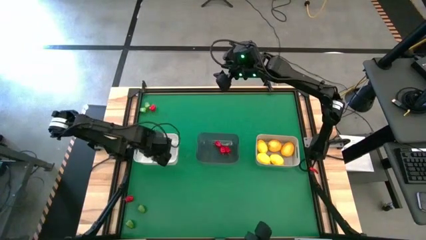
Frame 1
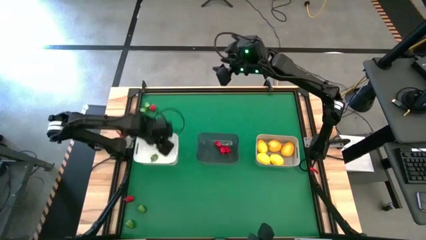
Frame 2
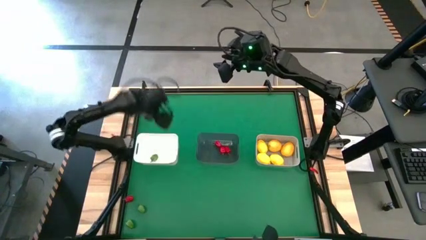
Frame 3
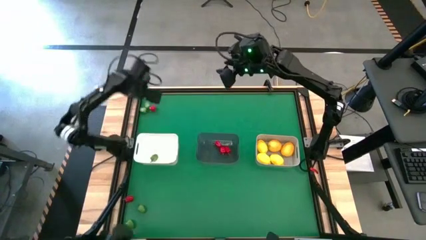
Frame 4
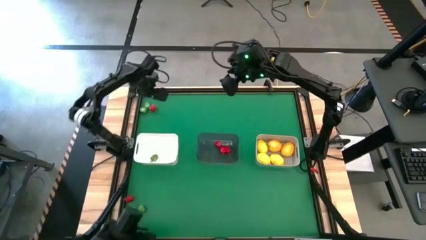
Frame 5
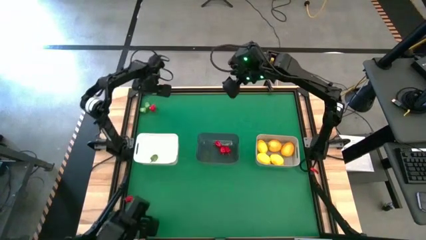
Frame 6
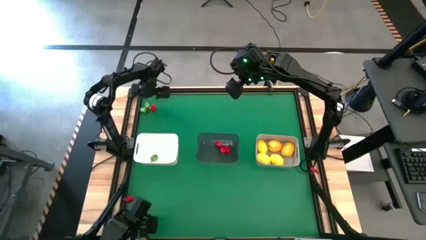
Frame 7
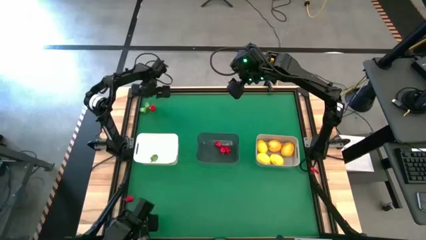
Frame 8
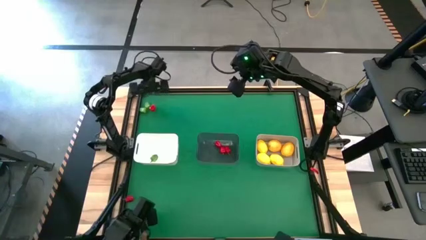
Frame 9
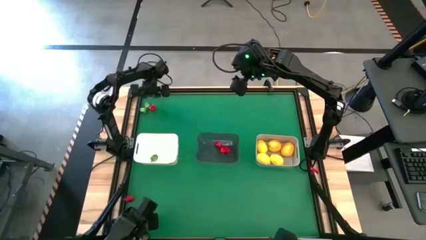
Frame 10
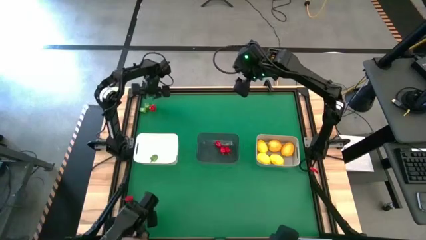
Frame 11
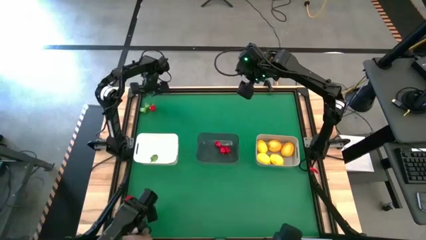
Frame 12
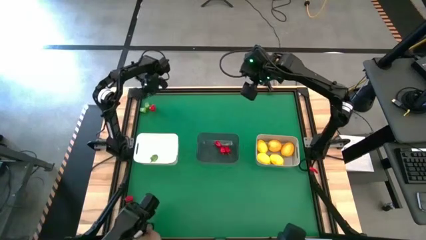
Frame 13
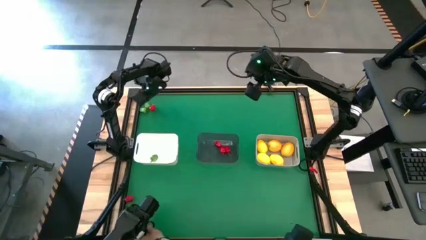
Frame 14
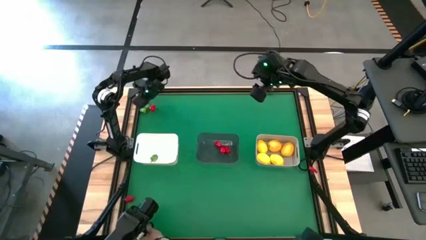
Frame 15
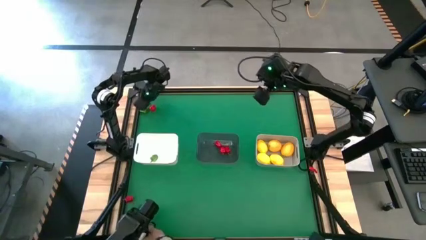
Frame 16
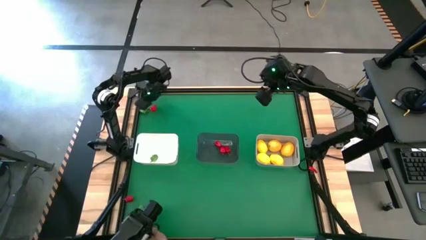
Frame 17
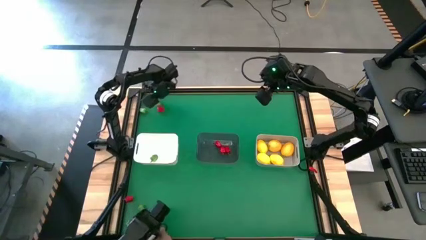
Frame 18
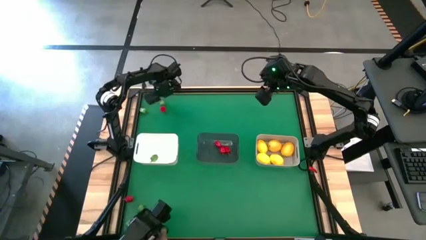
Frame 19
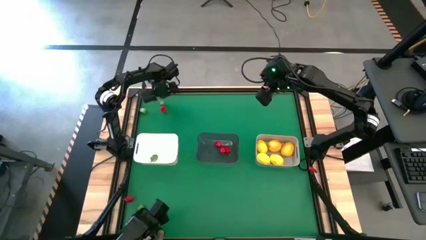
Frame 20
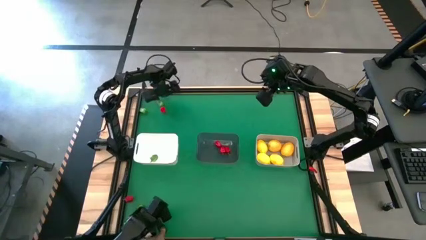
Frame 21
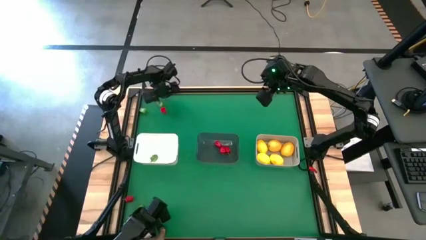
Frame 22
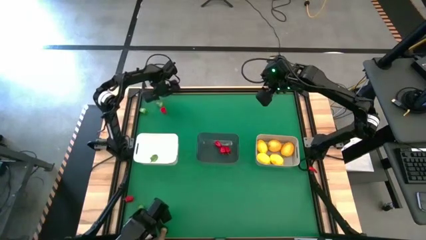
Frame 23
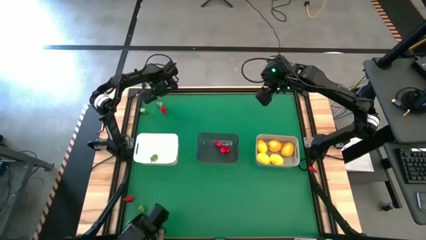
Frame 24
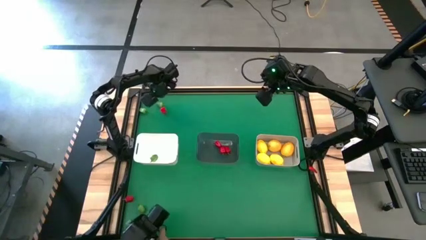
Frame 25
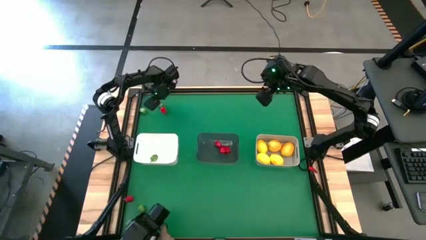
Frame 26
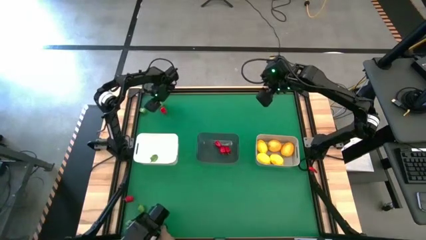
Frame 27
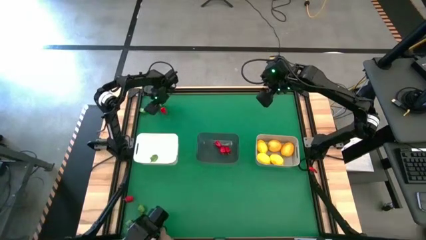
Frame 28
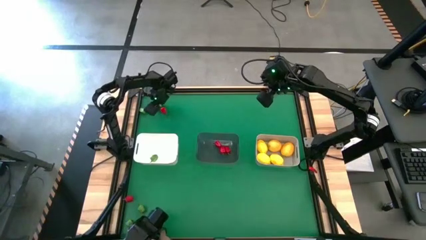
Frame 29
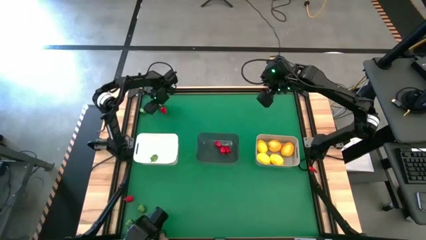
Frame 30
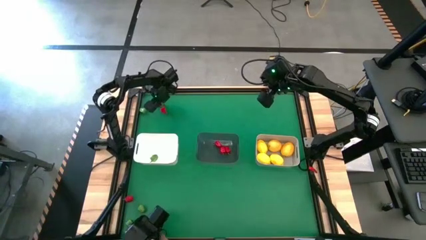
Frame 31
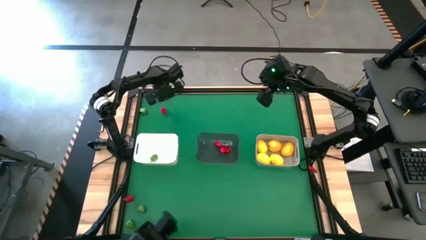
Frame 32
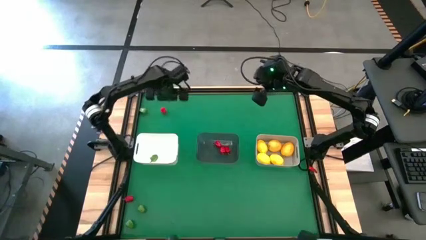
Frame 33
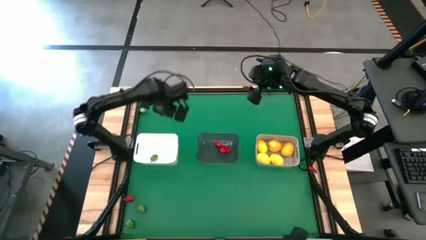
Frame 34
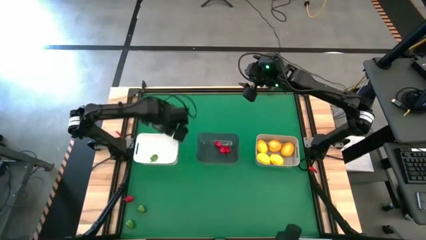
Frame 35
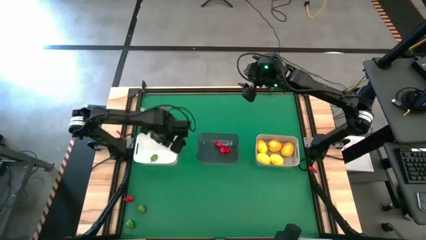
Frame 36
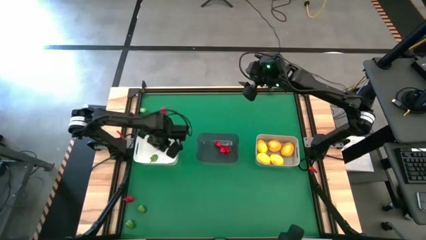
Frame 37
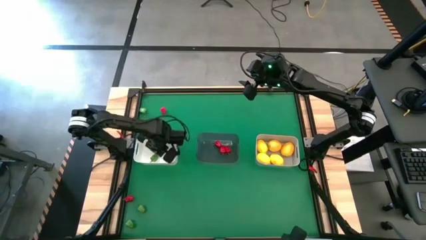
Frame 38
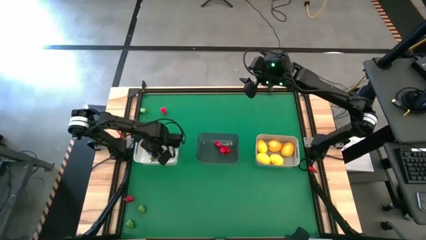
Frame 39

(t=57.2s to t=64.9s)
Task: Sort produce into baskets
Put the green chili pepper into the white bin

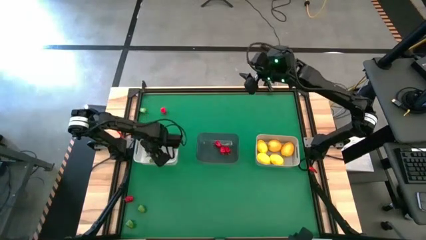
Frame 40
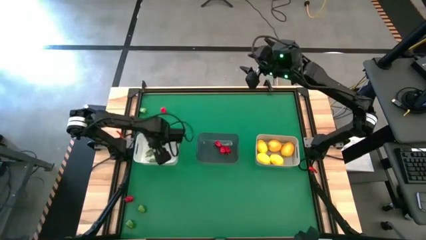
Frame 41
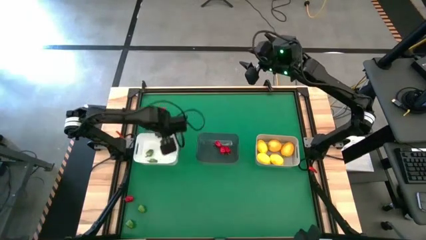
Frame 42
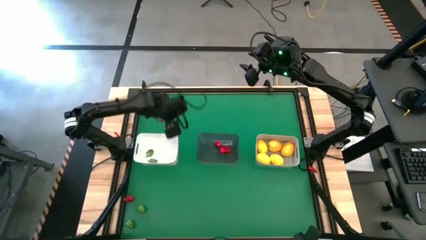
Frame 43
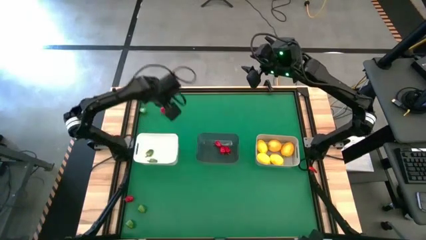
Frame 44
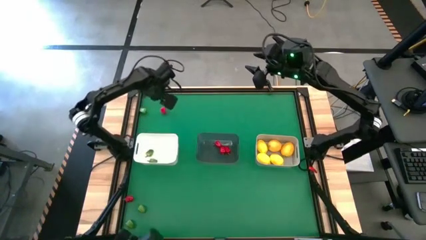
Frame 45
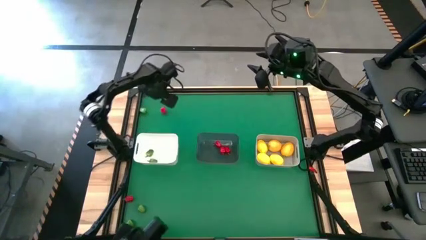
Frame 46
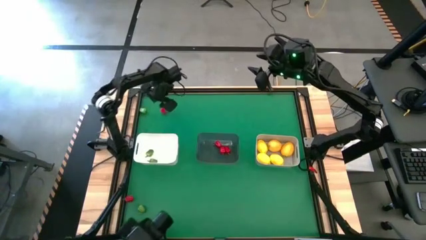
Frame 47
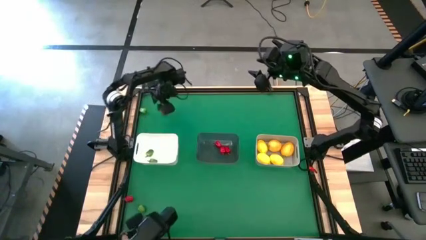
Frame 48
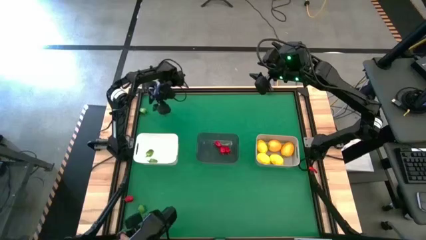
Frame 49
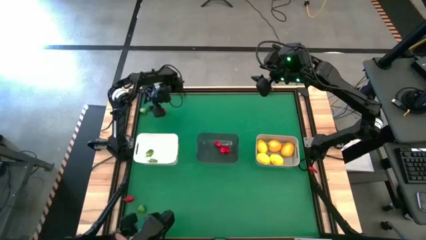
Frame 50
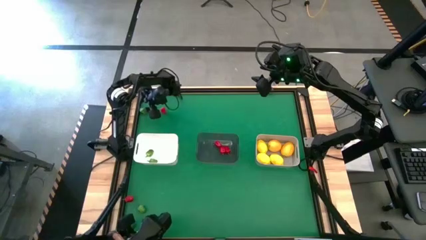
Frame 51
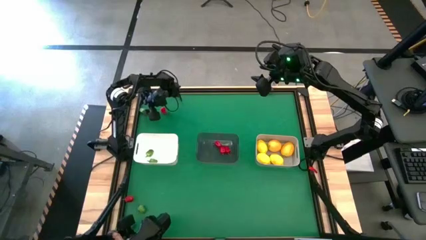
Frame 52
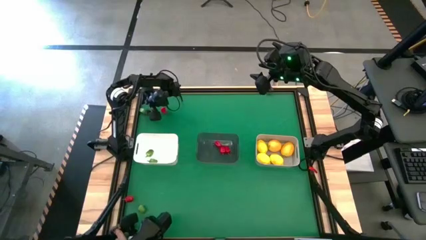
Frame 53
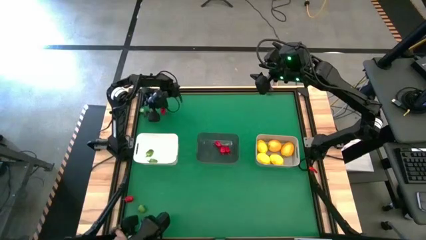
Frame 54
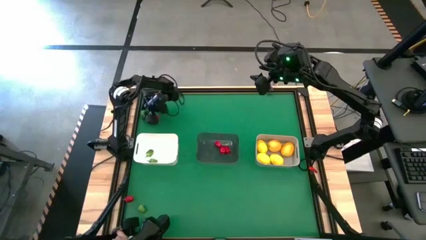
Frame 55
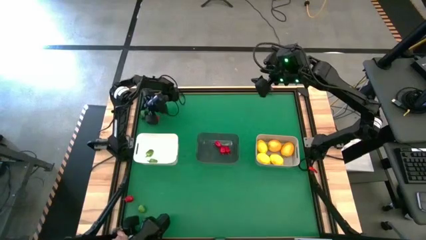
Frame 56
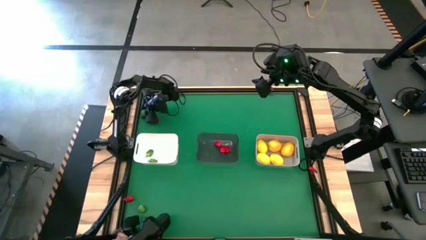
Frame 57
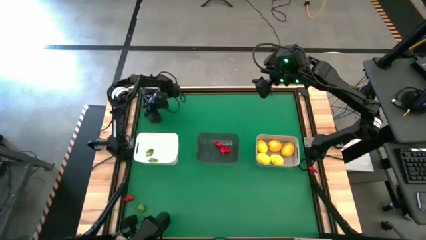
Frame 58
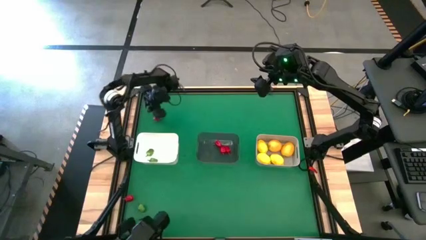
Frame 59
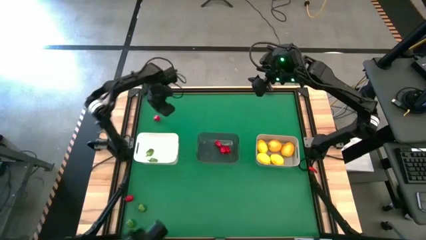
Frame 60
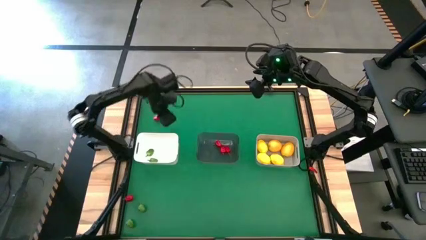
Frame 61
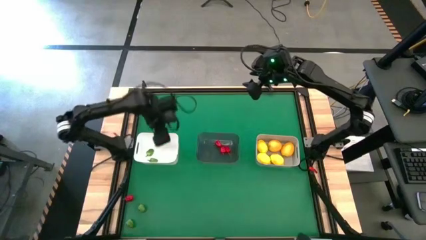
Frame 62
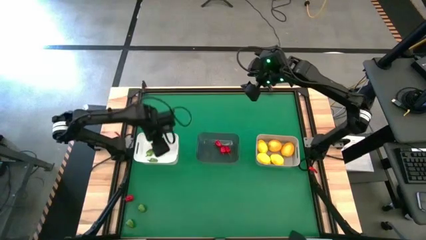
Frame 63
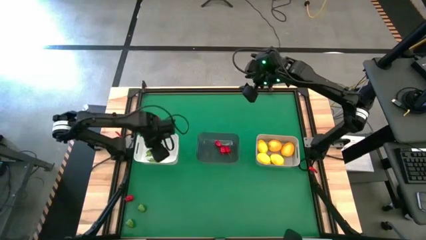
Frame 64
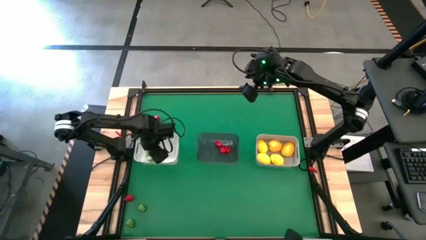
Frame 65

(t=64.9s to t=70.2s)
Put the green chili pepper into the white bin

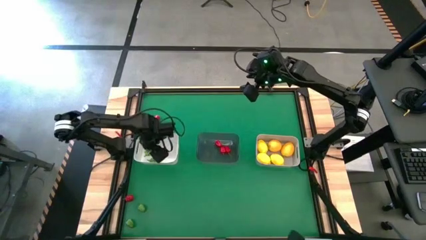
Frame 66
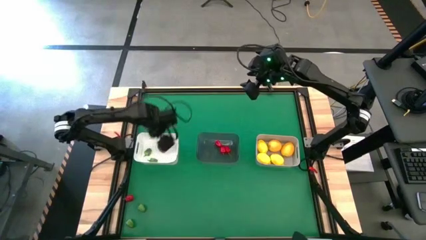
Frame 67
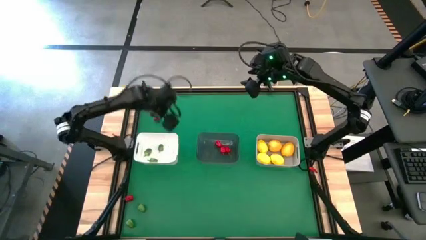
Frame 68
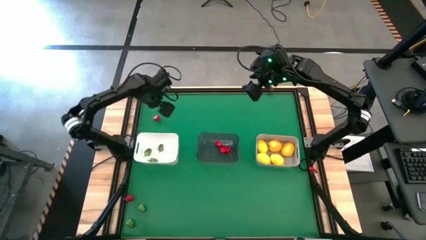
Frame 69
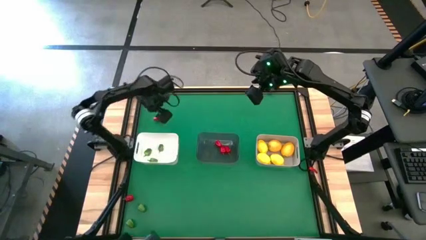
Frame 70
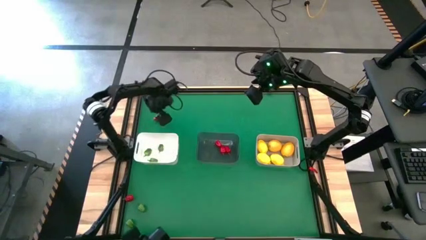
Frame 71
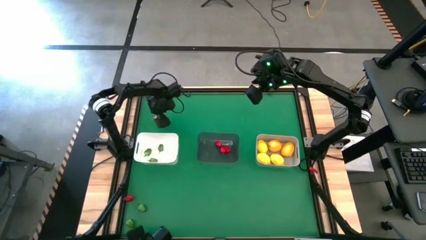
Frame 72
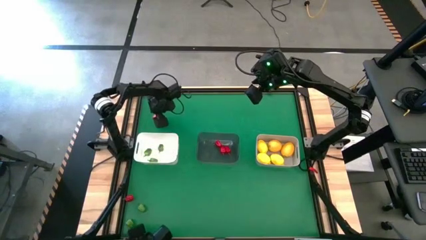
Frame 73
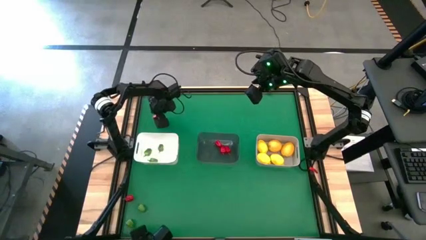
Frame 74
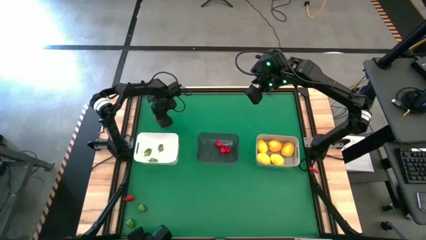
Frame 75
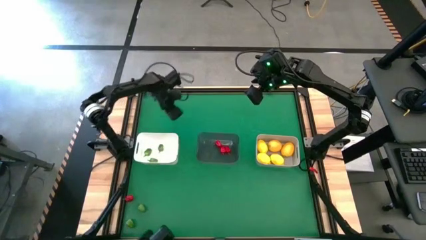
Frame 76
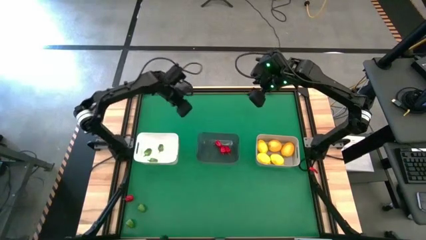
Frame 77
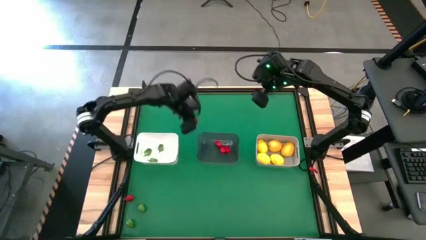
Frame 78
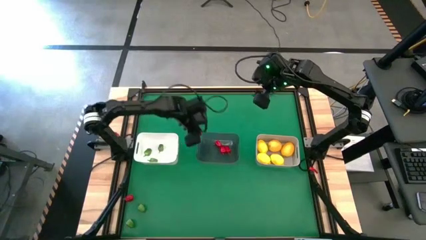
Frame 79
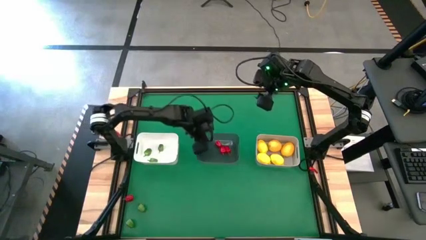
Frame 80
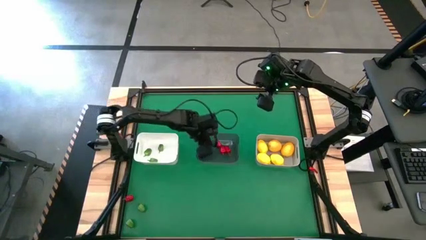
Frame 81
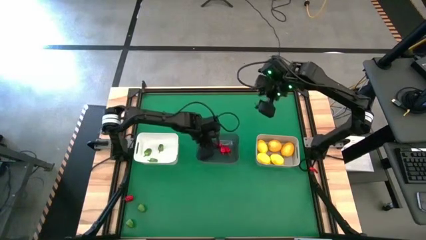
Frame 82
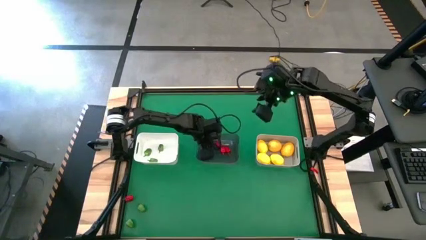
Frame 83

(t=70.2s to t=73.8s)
Put the red chili pepper into the black bin
